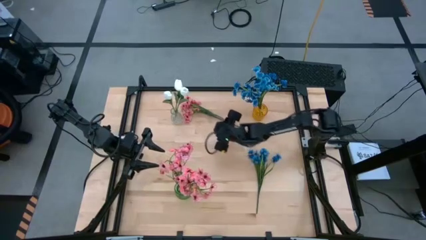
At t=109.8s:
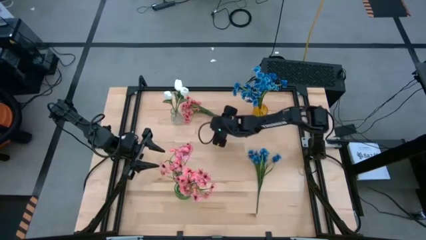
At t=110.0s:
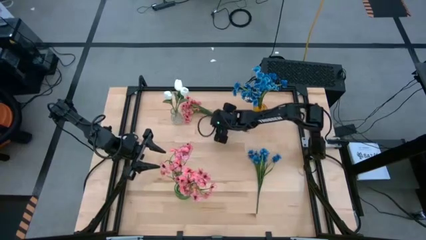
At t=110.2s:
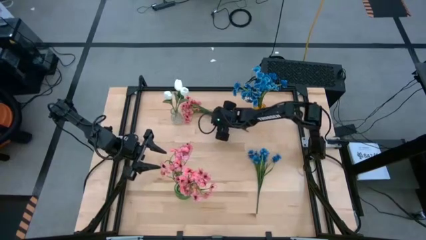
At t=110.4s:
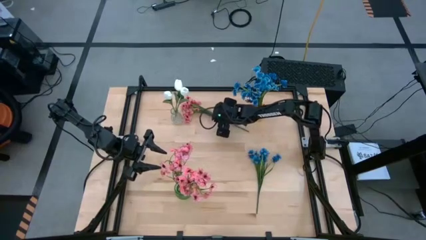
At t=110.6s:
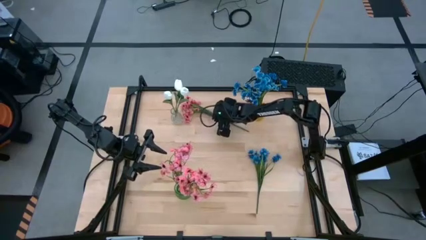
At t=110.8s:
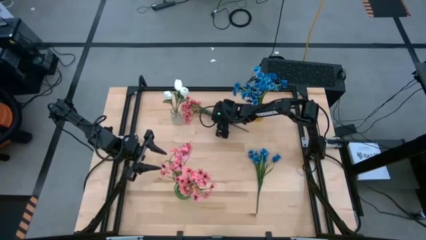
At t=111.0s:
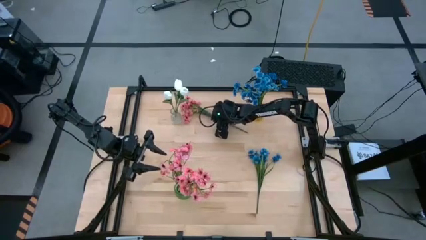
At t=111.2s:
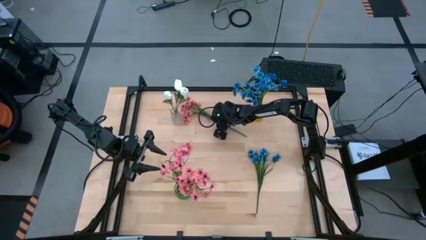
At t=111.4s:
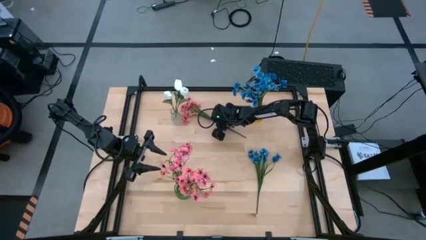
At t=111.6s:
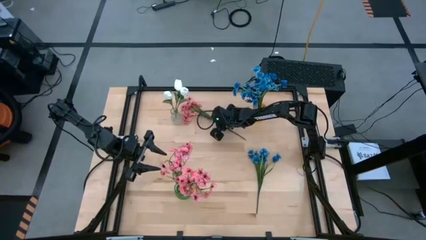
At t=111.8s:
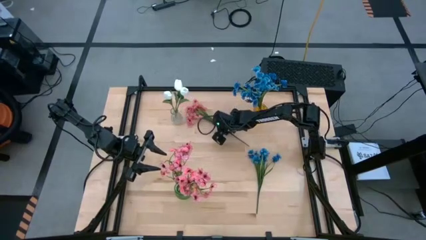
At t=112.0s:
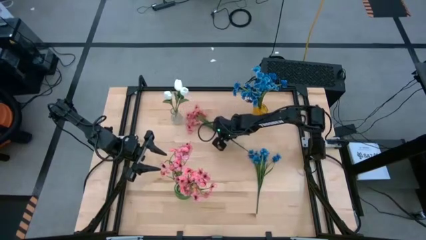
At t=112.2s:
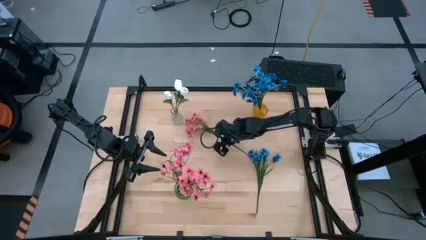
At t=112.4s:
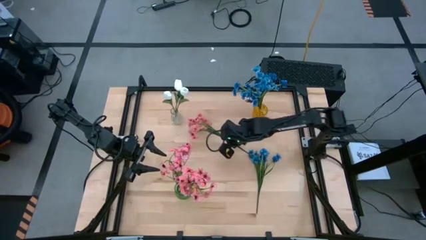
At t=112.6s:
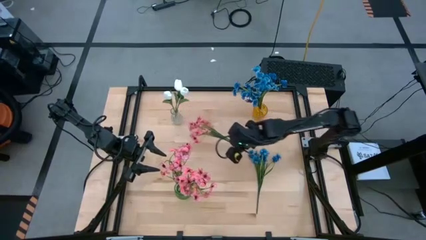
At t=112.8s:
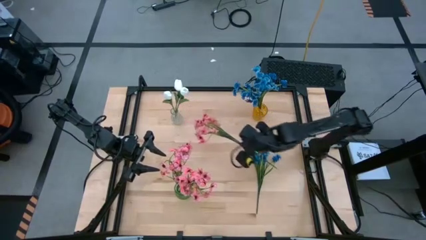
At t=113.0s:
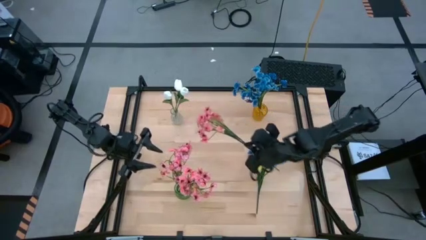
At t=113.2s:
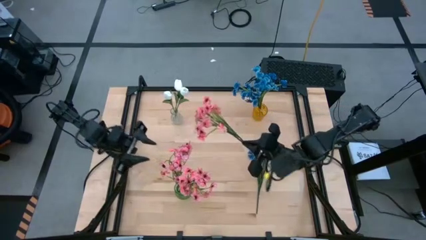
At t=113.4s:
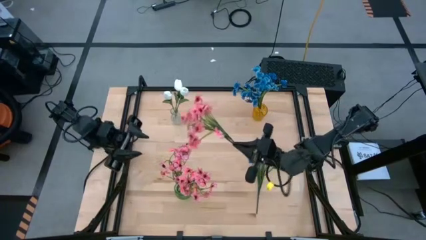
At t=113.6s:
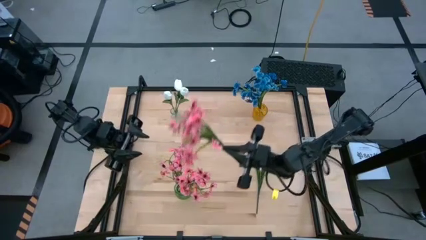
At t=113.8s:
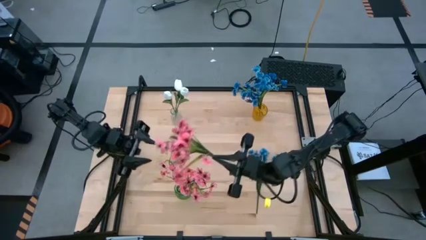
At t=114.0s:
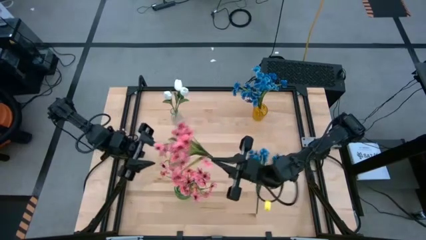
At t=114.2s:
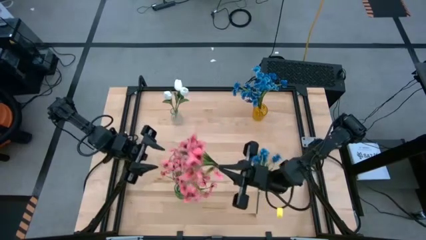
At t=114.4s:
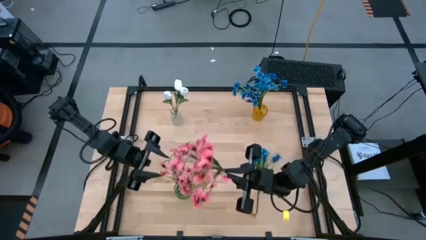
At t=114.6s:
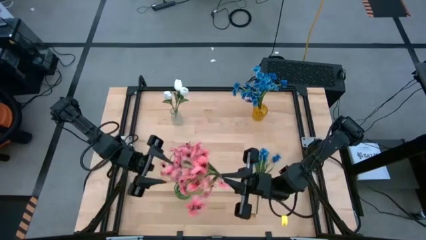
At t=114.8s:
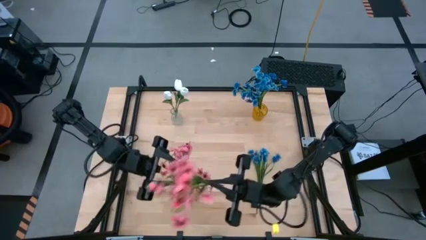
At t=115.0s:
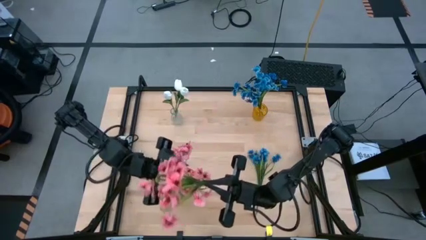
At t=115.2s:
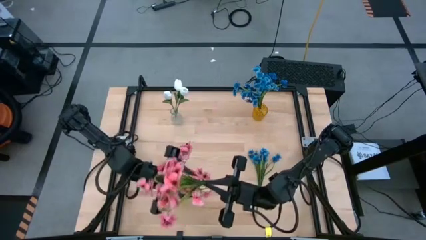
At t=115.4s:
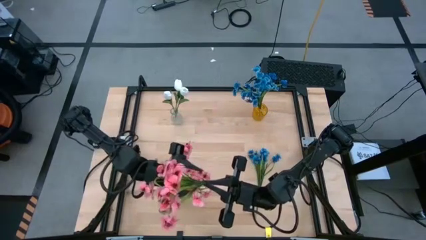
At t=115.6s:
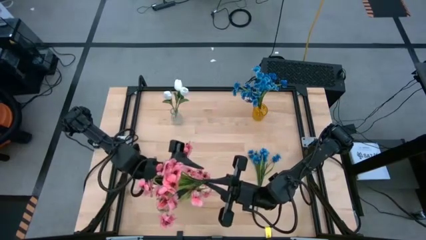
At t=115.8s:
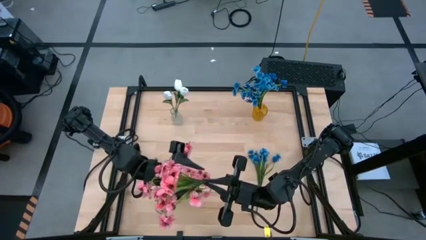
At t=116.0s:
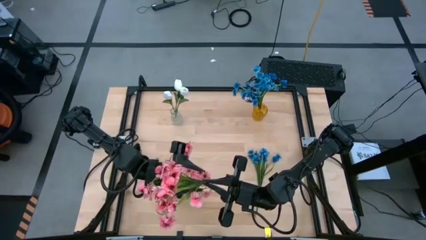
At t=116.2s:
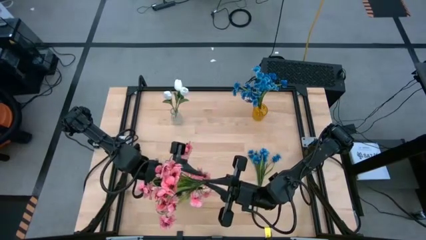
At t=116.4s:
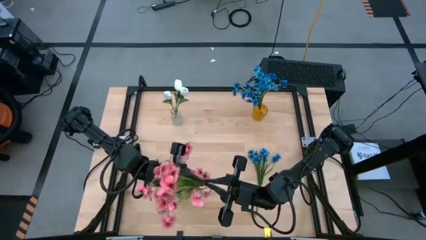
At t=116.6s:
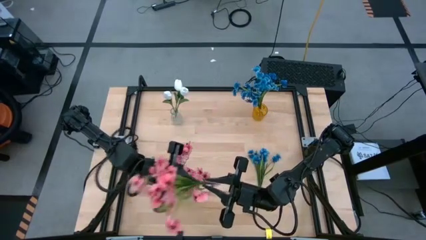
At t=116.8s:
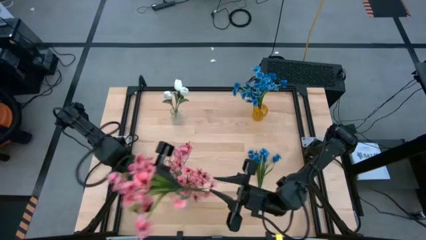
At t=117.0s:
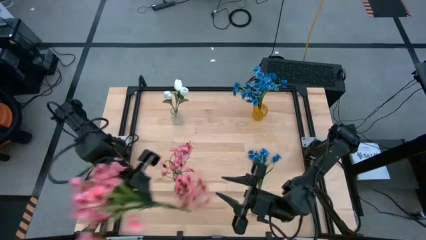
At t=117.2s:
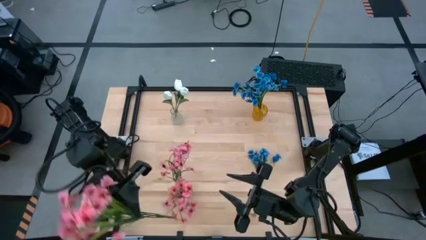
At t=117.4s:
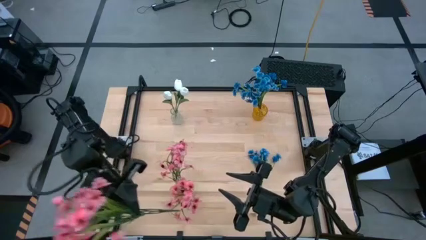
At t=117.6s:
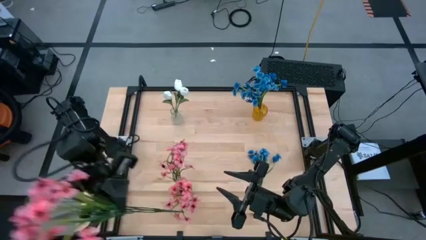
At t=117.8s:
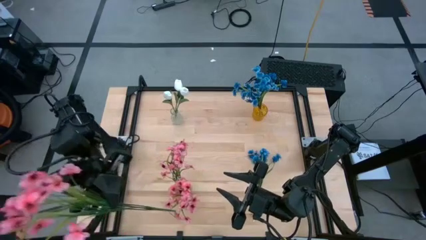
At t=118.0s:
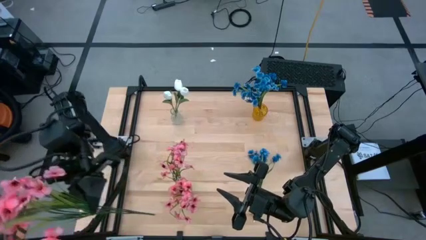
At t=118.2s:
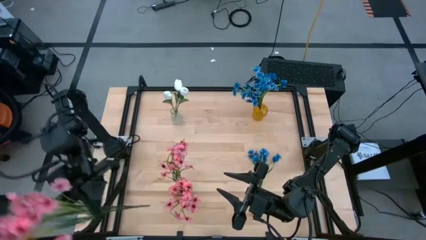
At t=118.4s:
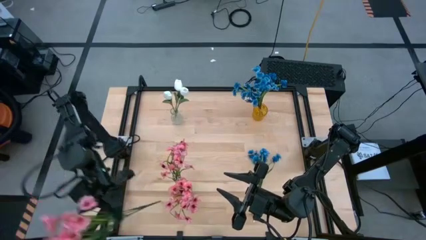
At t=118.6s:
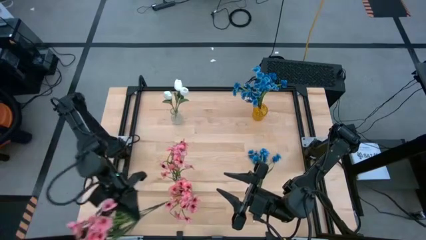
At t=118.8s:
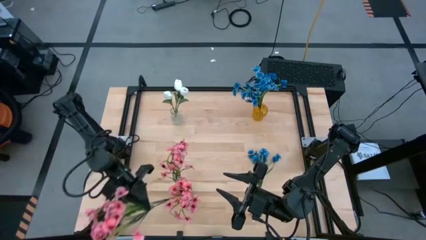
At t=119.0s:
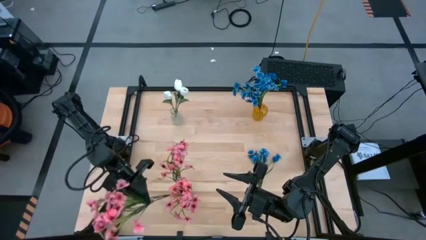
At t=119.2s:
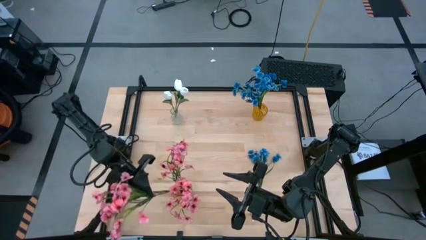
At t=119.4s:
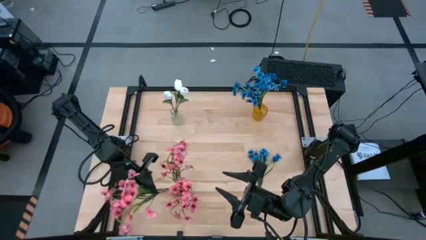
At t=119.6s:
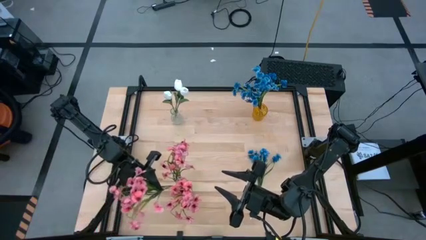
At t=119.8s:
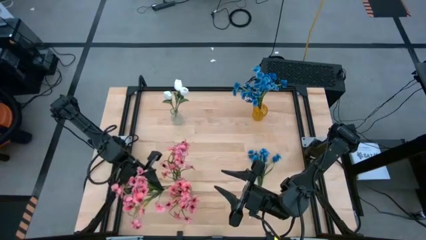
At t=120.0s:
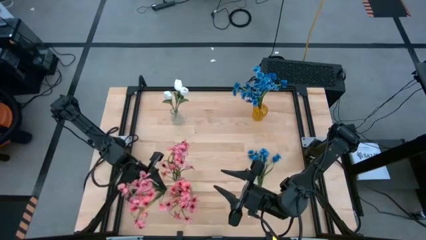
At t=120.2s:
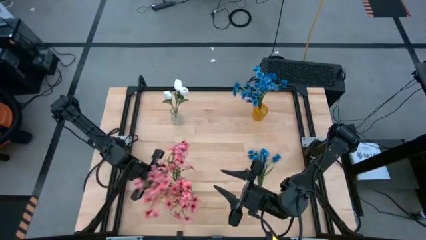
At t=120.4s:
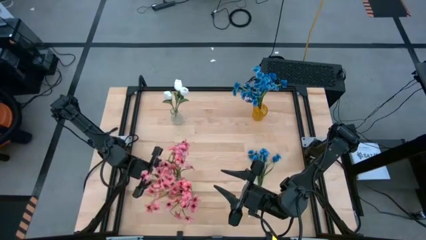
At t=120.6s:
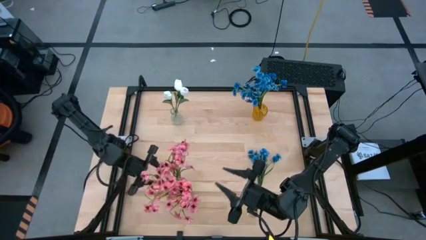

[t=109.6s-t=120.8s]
Task: Sort flowers into vase by color
Put the pink flowers into the green vase
